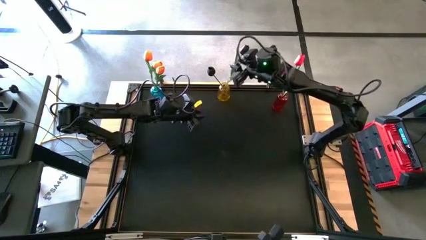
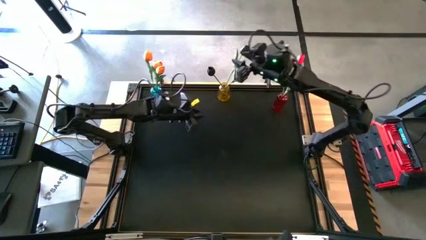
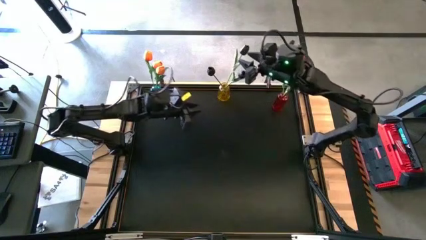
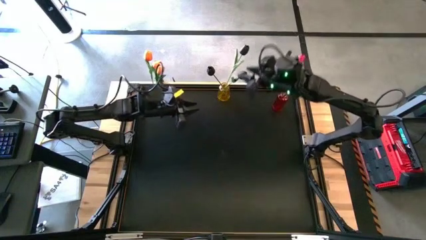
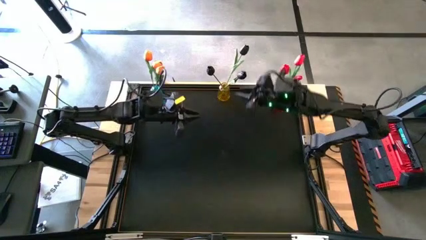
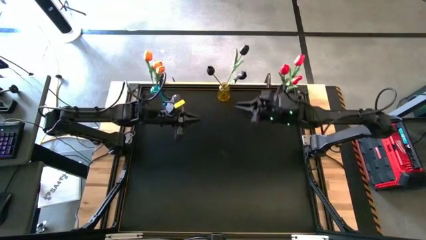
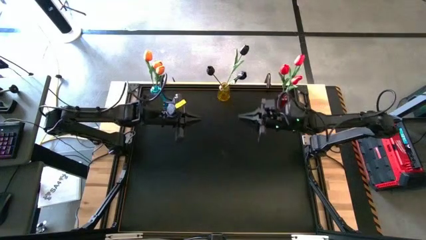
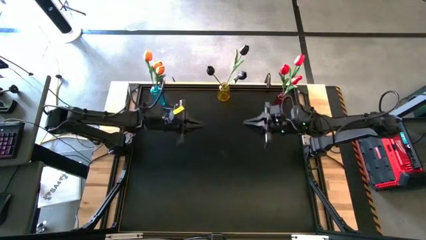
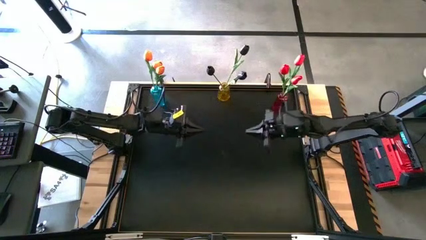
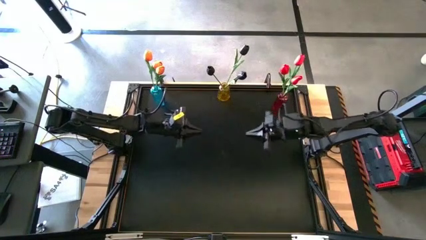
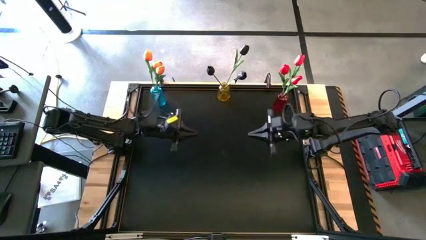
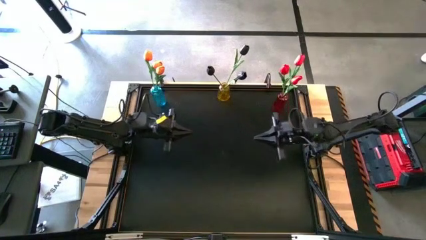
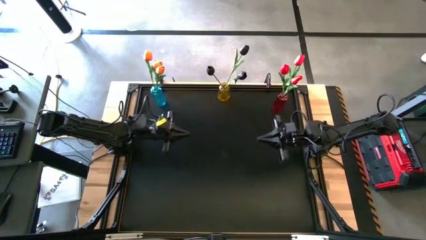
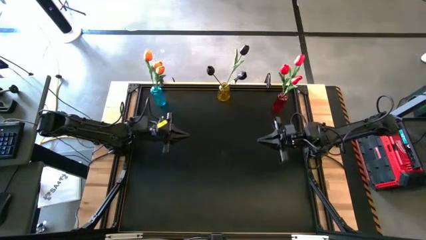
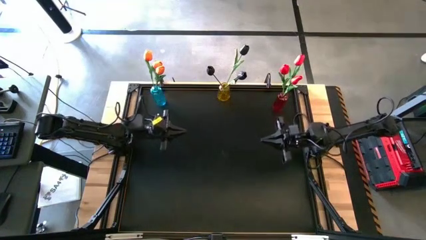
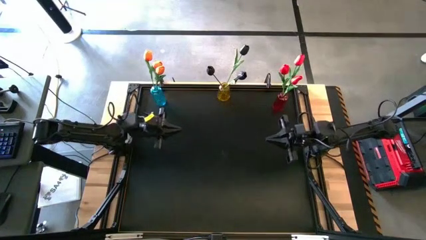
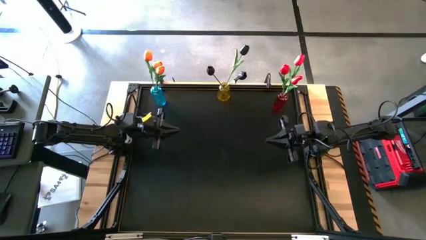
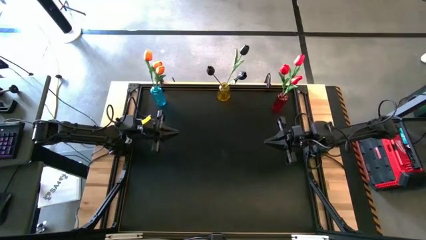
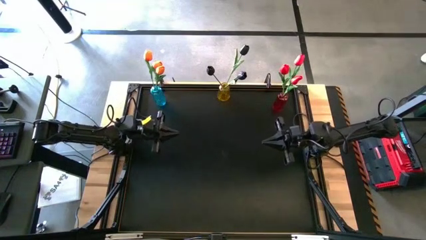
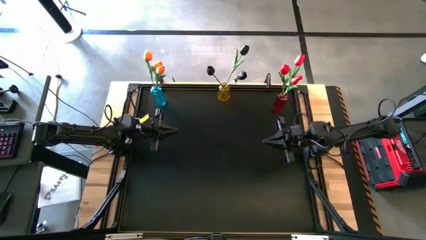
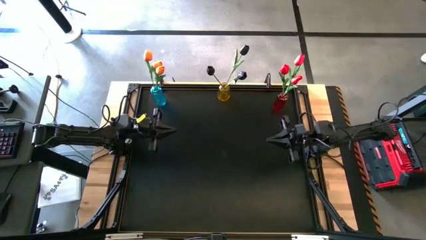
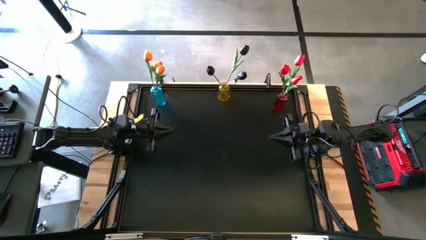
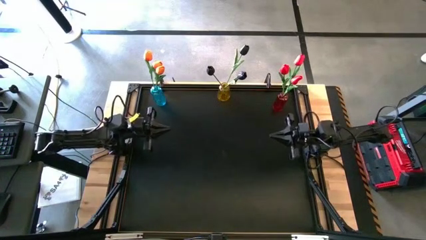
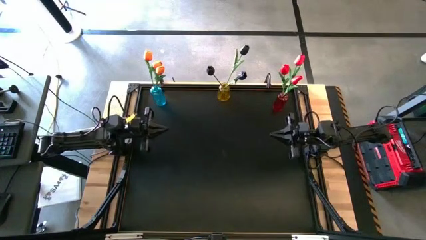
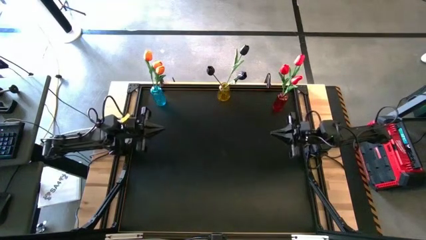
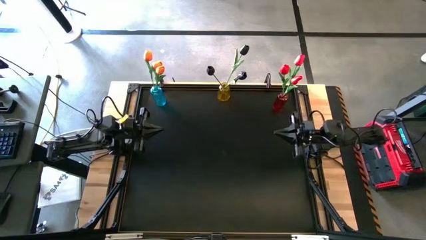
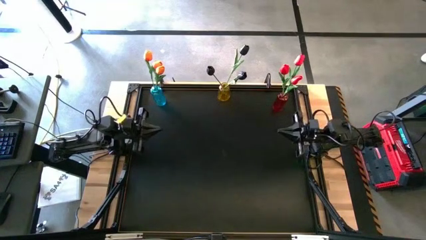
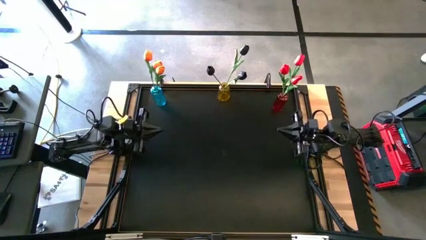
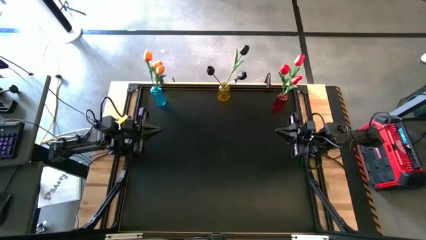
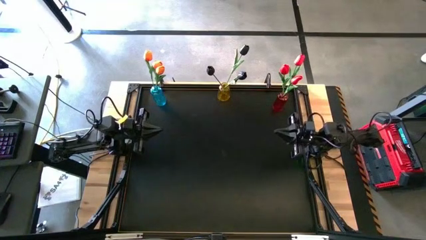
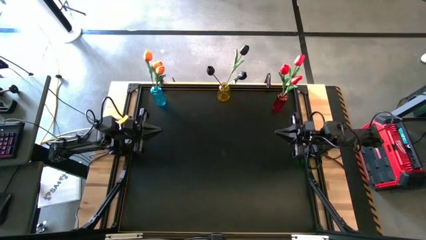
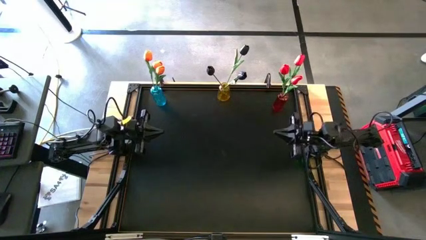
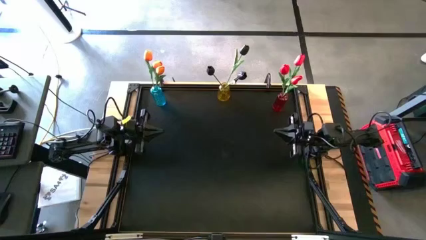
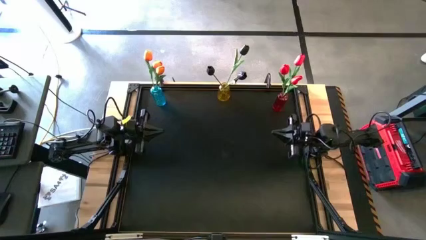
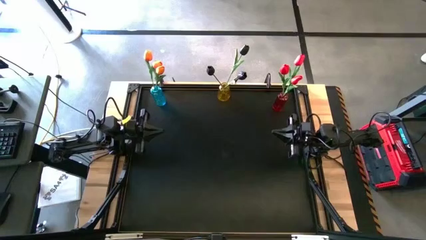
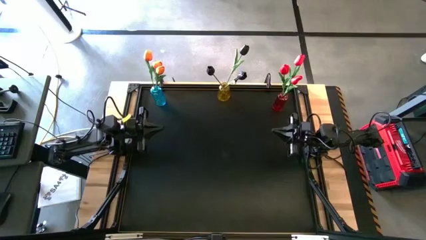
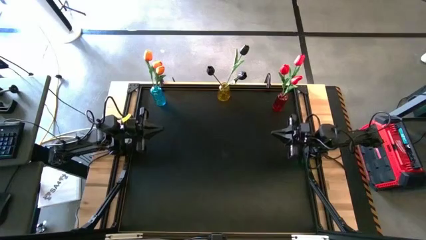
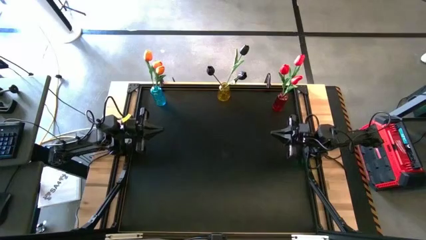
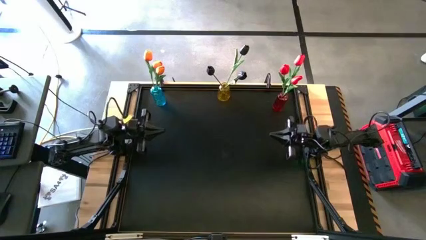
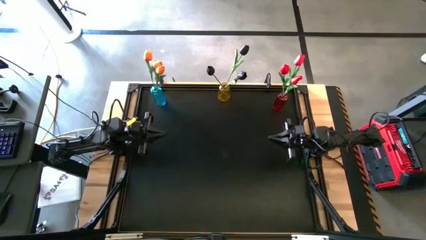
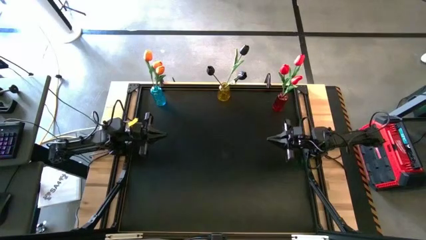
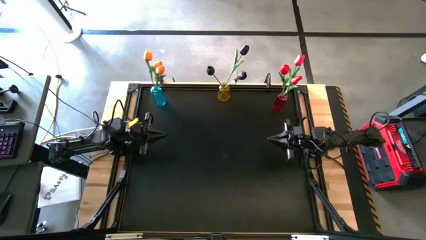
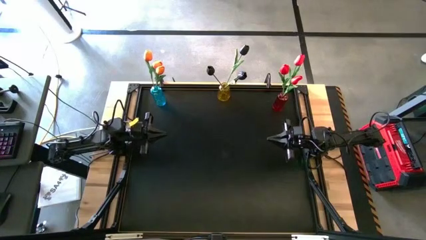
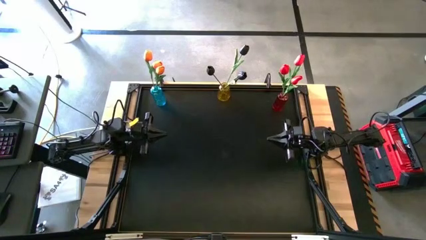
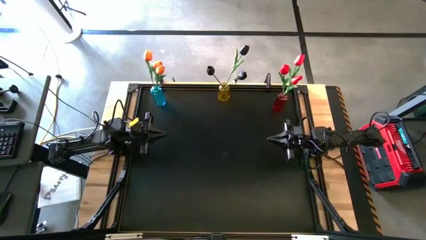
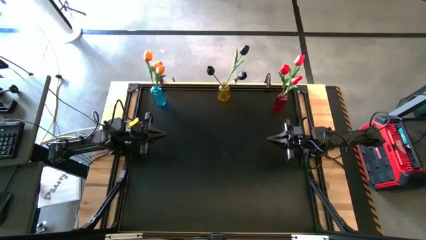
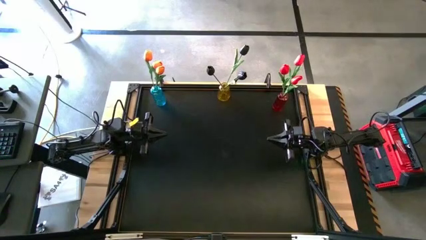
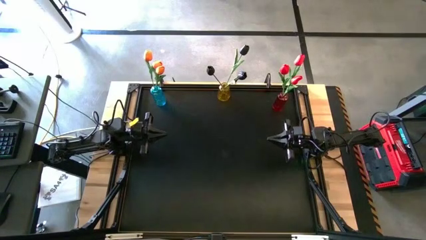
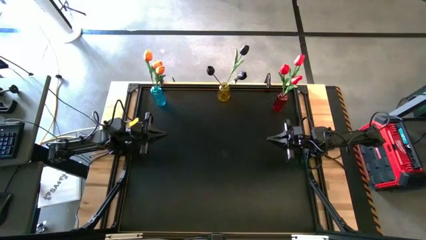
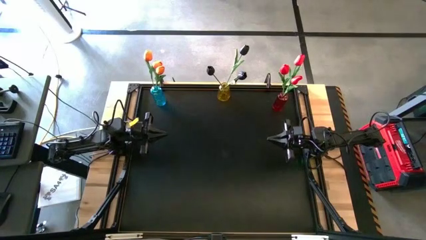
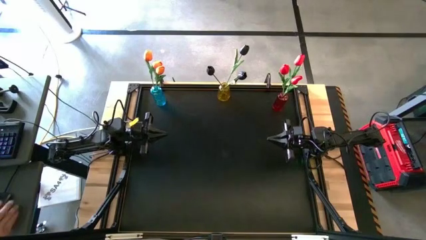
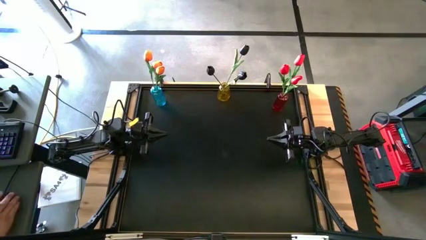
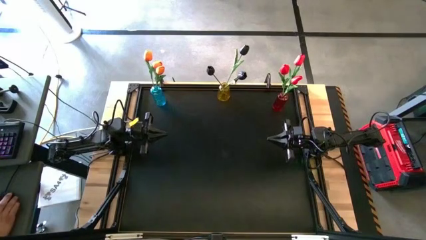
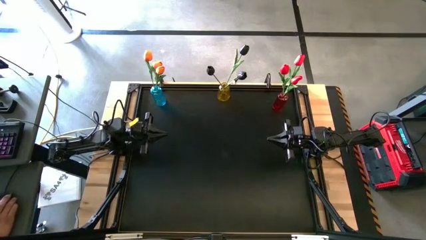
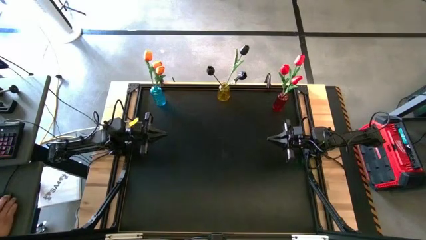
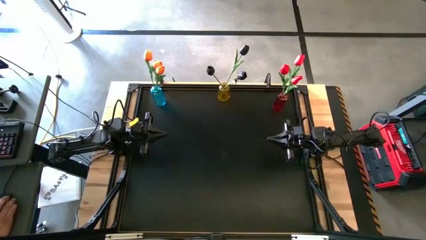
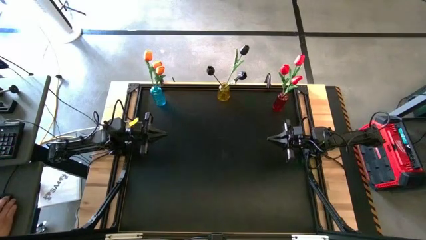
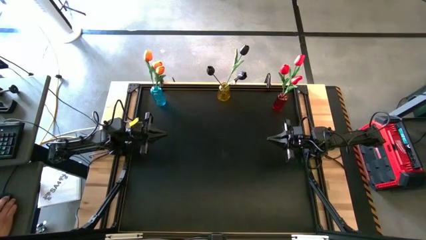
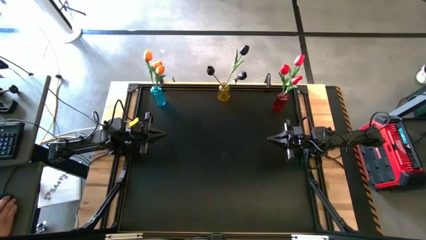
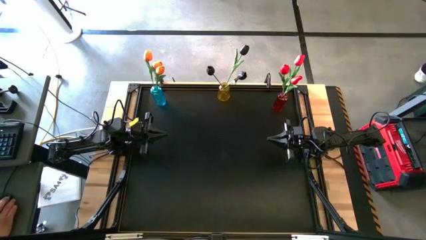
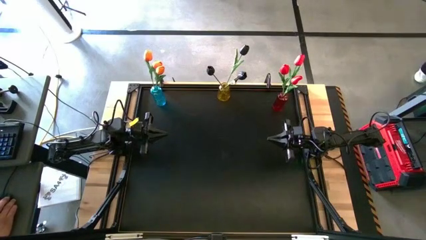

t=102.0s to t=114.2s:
Task: Sort flowers into vase by color
Return to Home Position

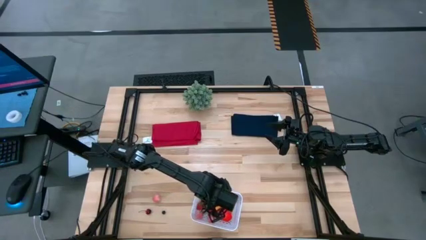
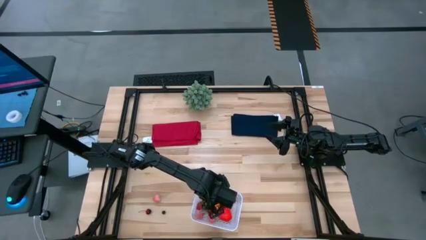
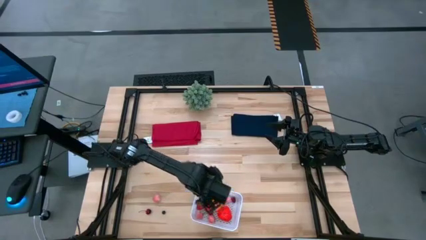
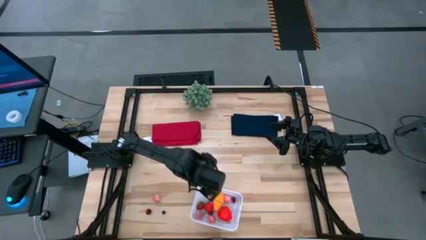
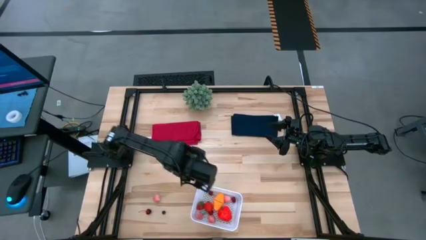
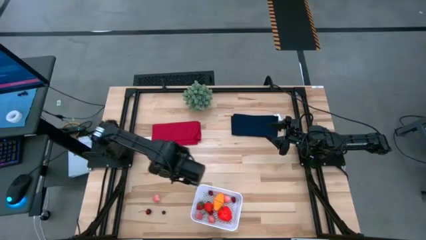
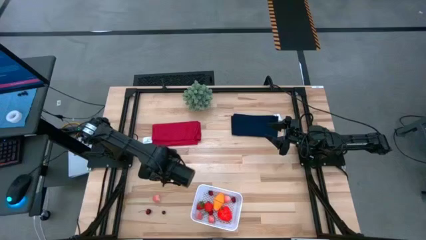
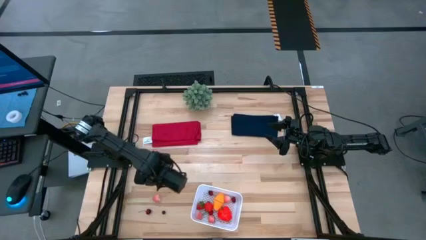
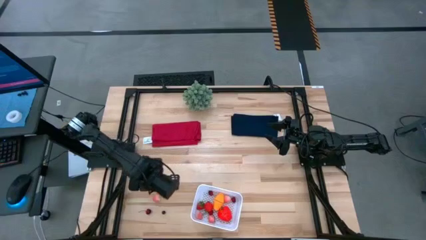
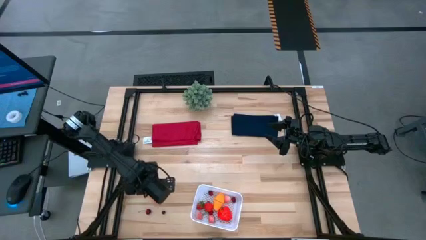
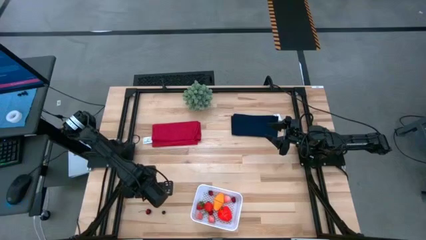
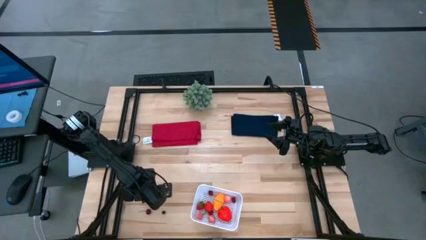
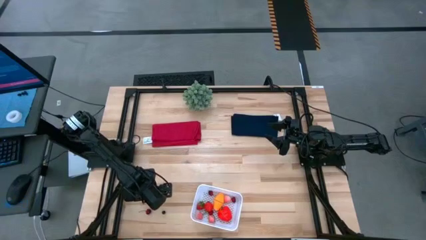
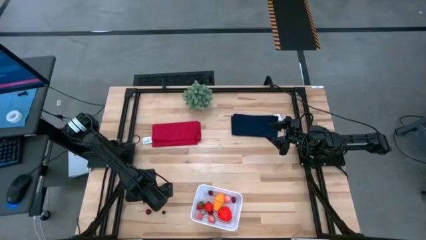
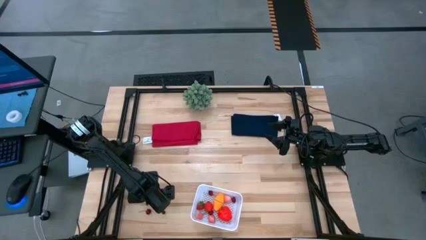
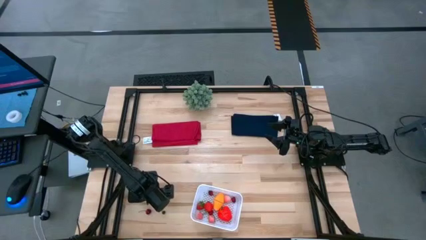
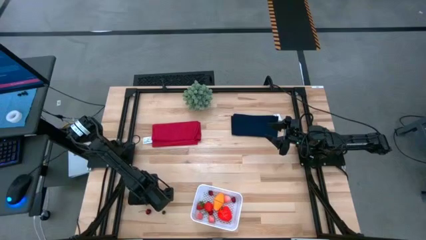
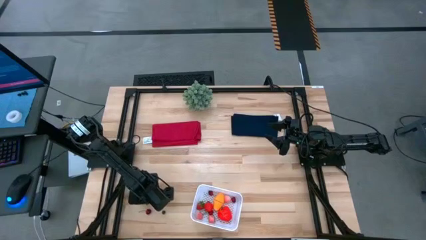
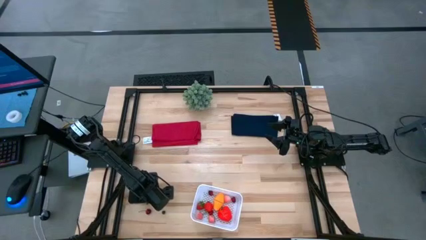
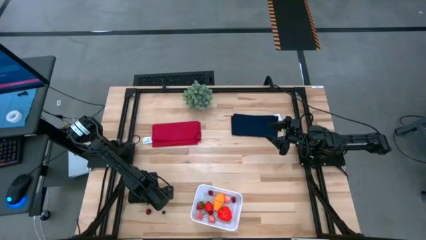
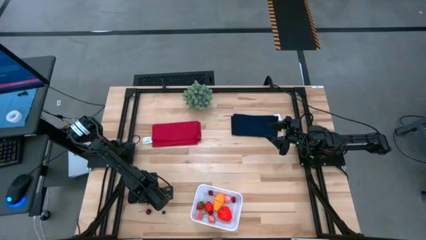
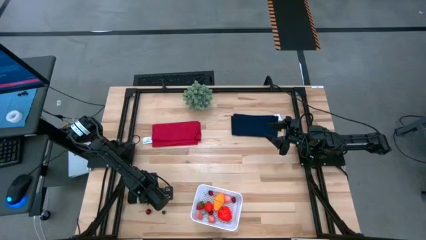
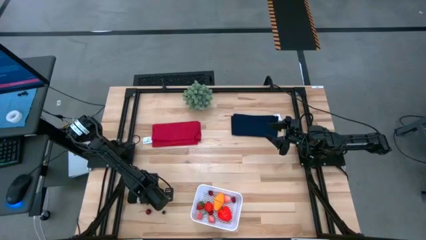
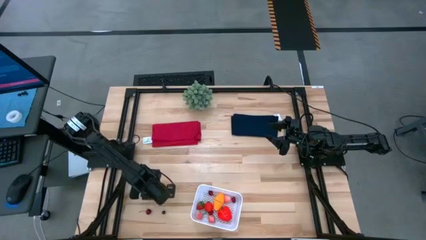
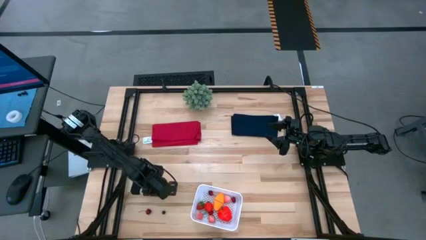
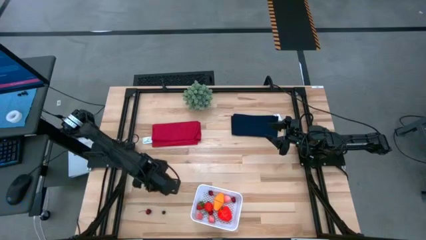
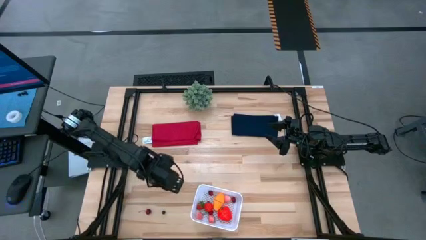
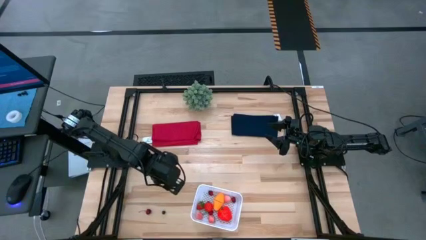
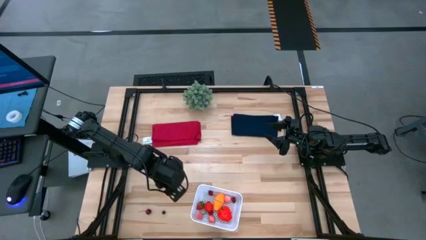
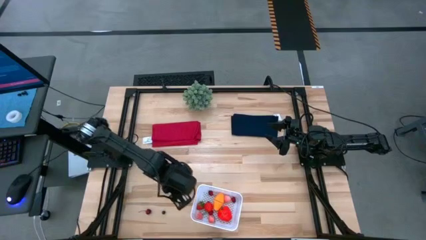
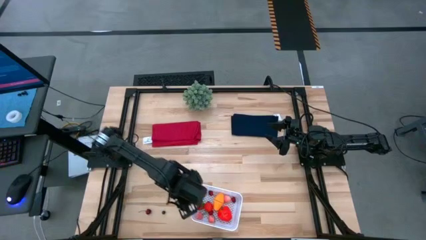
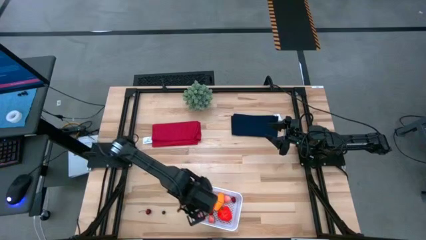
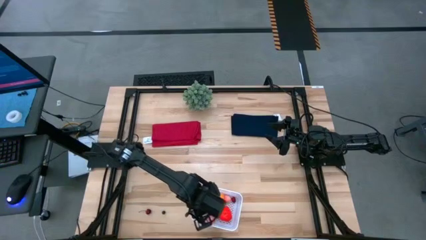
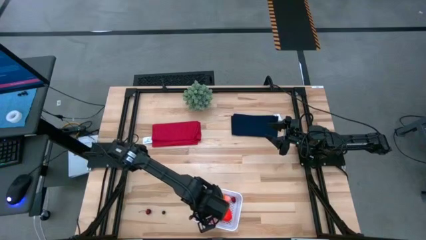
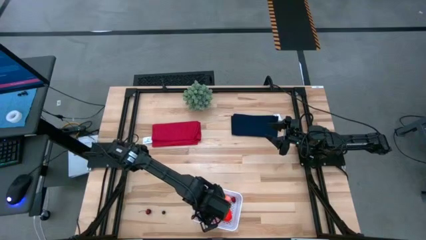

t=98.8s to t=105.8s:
Task: Pick and placing Produce into tupperware
Put the peach into the white bin
